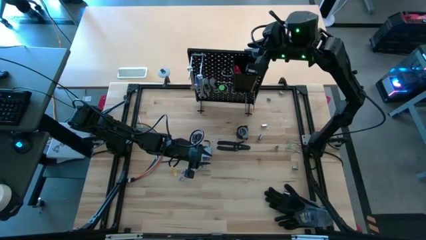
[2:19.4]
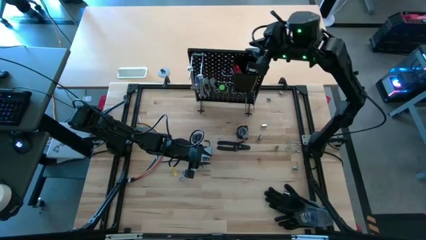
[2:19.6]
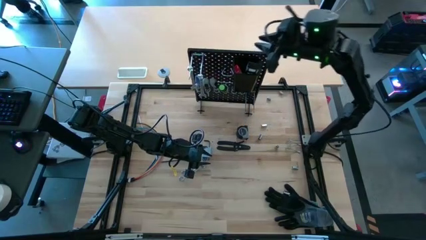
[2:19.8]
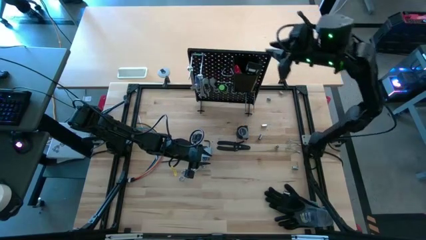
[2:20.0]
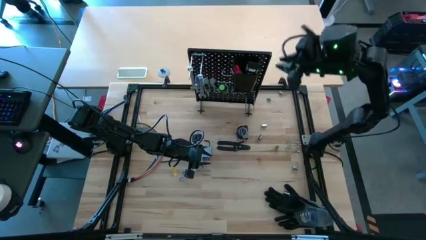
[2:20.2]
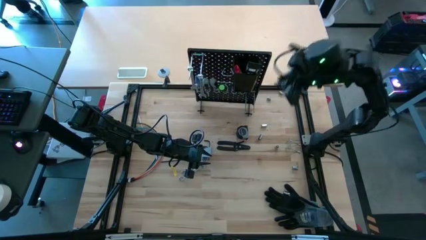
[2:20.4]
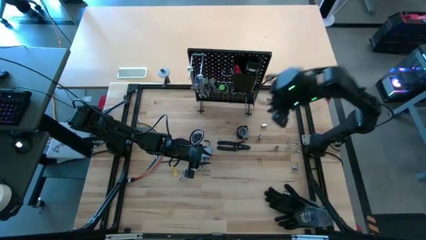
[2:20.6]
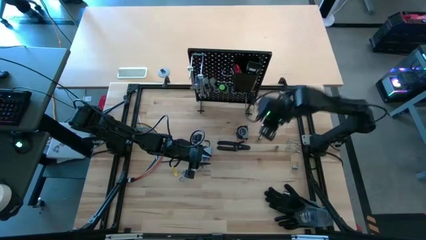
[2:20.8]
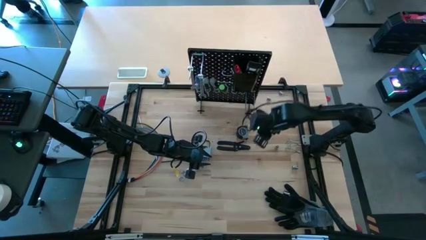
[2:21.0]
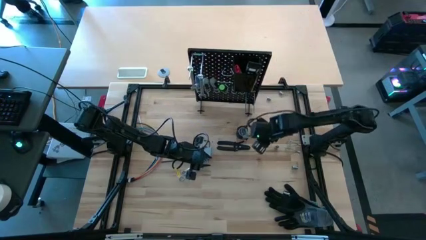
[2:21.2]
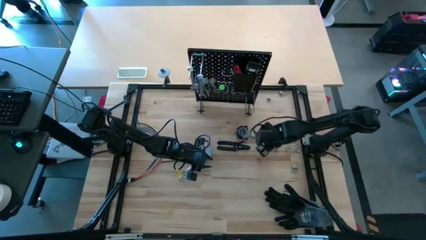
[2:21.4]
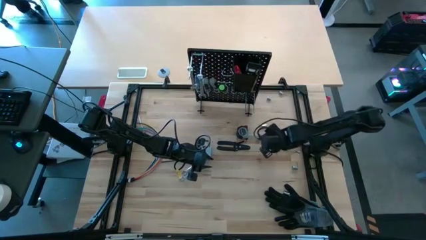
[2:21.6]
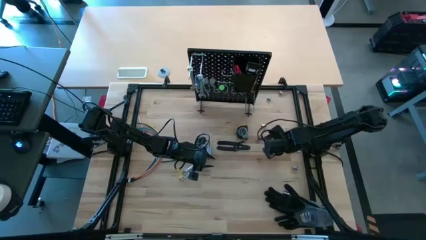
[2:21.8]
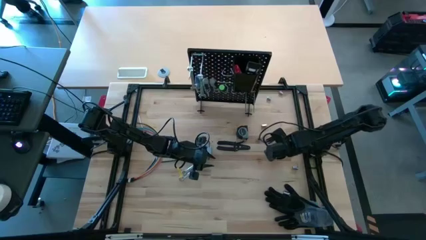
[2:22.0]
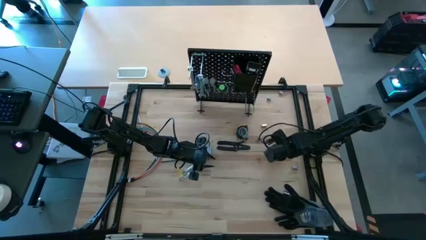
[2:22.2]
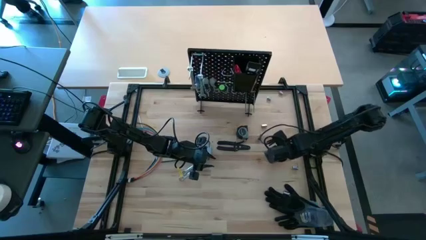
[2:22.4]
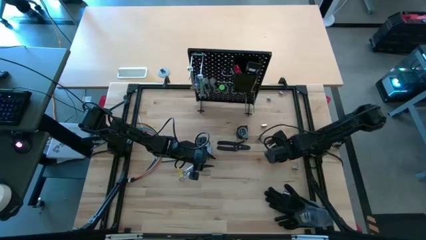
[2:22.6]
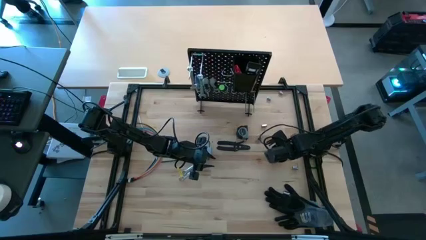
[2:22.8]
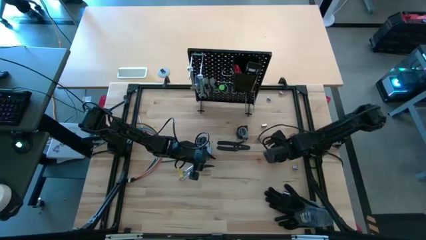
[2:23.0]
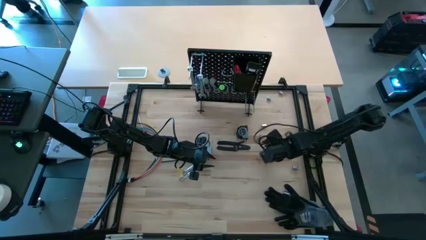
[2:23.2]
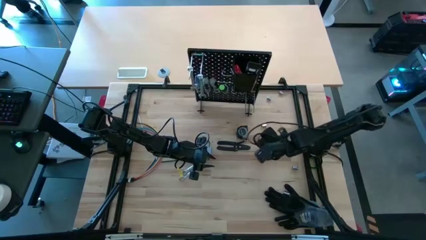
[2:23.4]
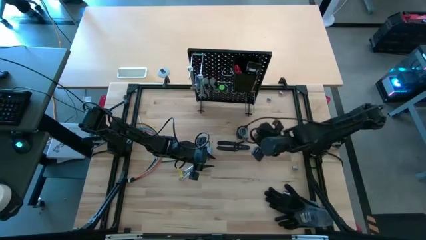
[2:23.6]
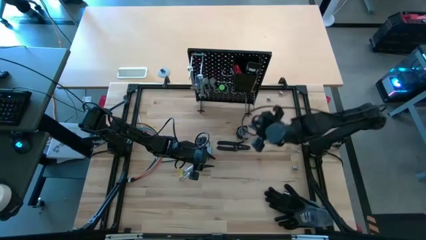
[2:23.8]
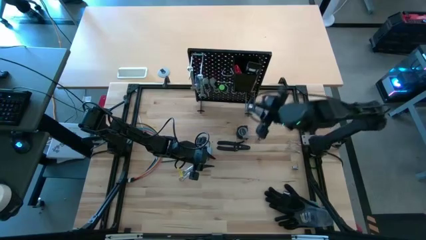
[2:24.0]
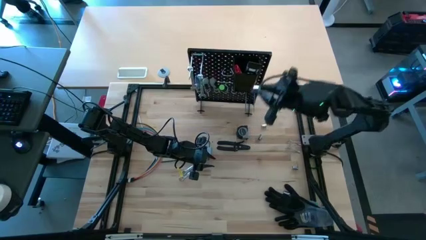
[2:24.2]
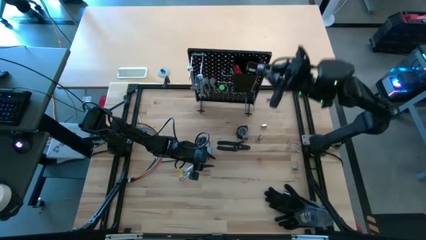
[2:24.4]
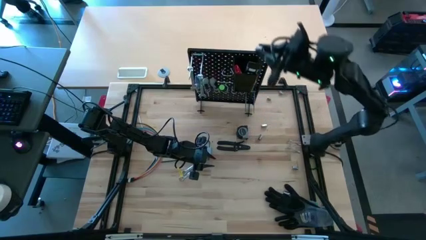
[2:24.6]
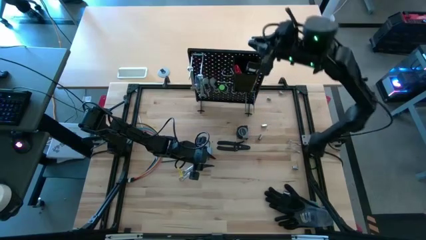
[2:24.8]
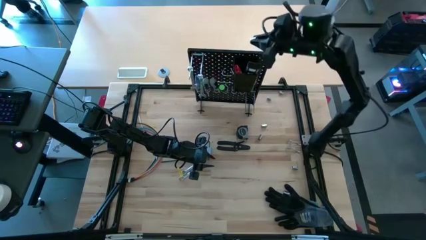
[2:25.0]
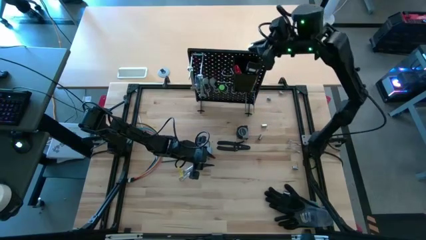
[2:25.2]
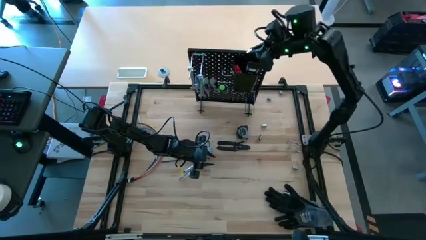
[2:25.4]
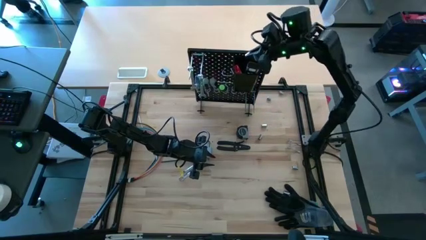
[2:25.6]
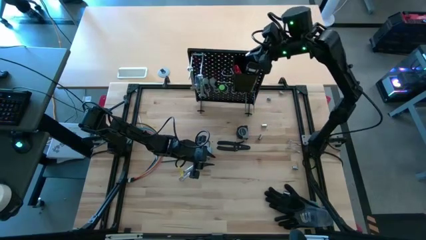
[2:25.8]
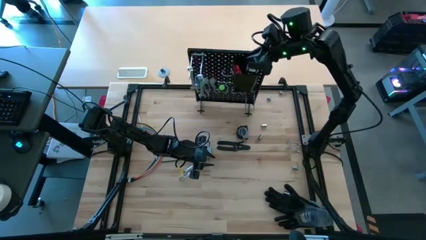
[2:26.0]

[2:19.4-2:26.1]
Task: Hang tools onto peg board
Put the socket into the black bin on the peg board

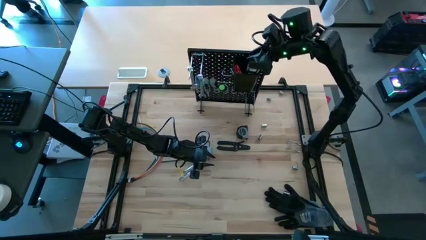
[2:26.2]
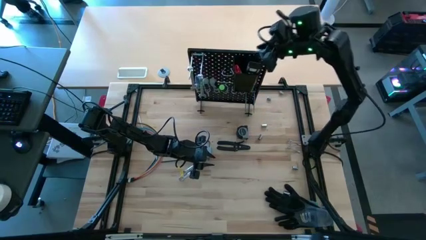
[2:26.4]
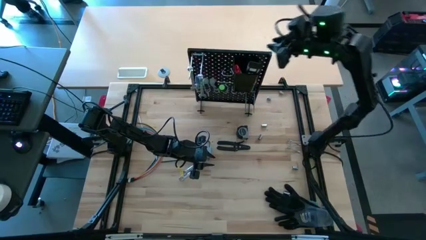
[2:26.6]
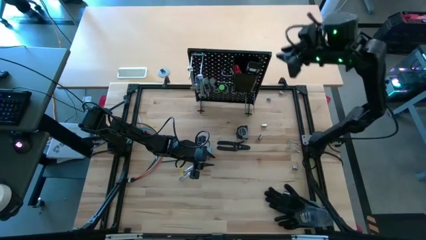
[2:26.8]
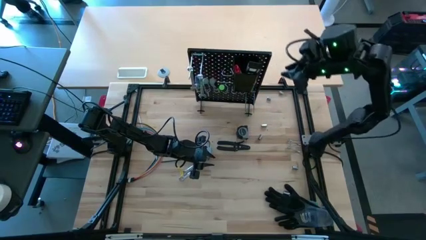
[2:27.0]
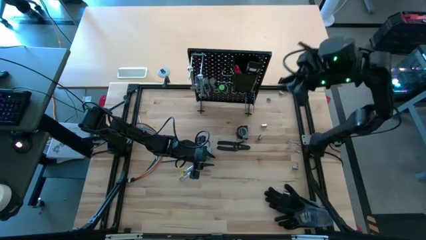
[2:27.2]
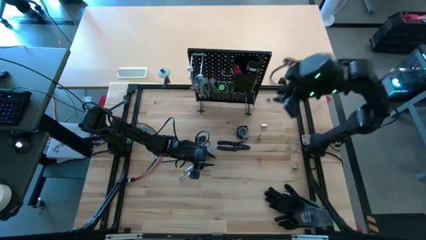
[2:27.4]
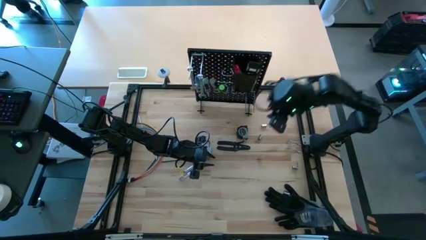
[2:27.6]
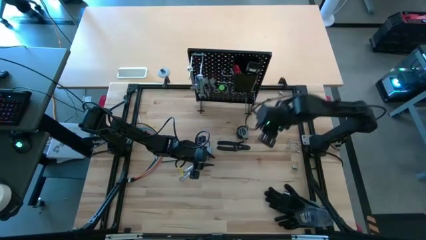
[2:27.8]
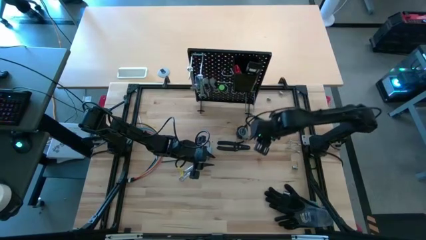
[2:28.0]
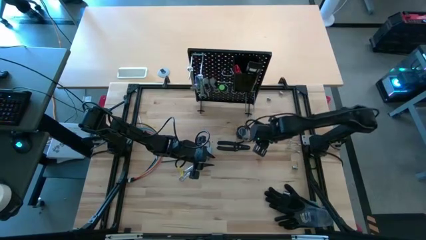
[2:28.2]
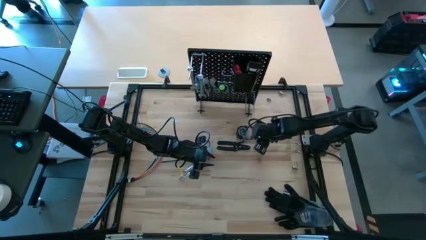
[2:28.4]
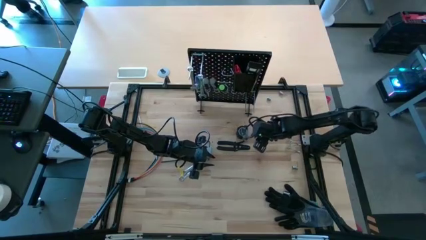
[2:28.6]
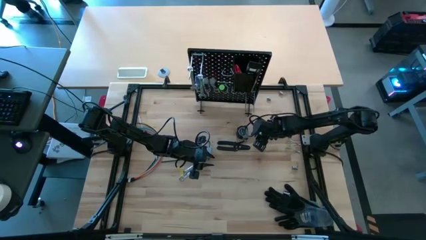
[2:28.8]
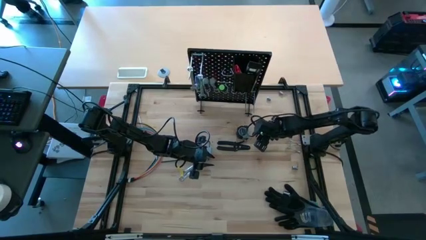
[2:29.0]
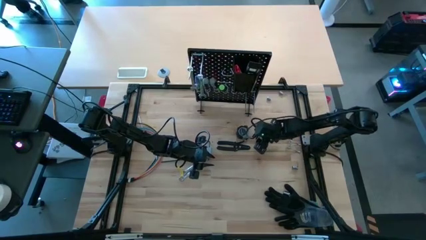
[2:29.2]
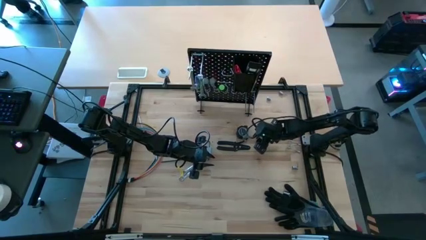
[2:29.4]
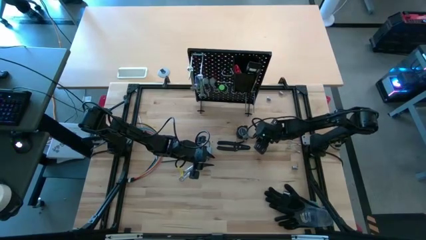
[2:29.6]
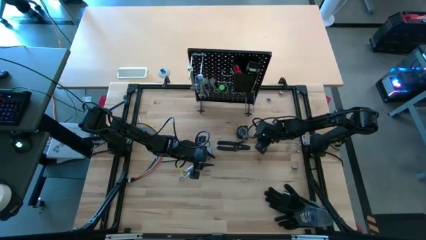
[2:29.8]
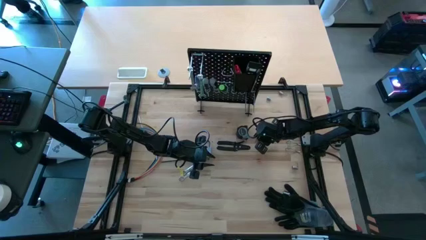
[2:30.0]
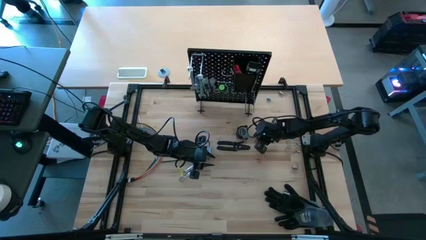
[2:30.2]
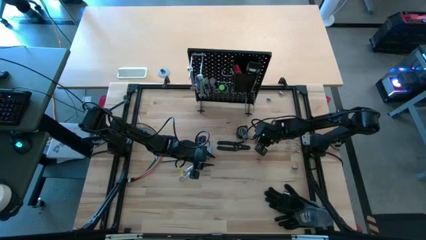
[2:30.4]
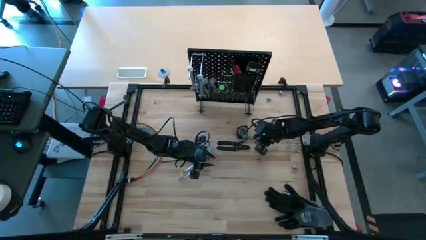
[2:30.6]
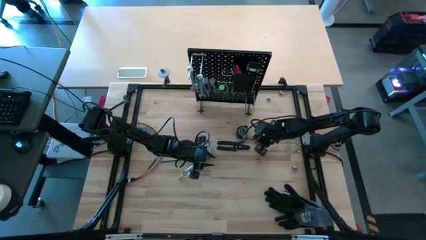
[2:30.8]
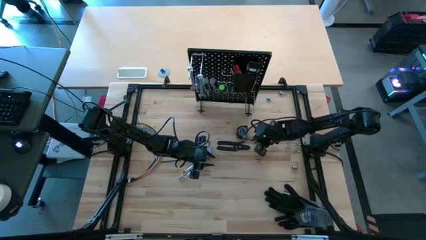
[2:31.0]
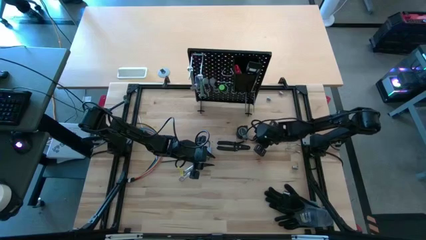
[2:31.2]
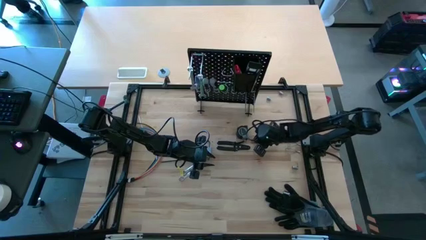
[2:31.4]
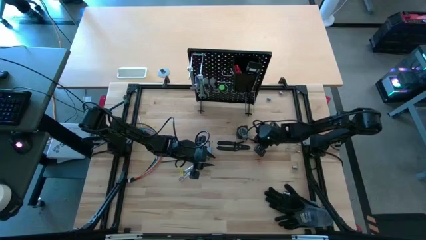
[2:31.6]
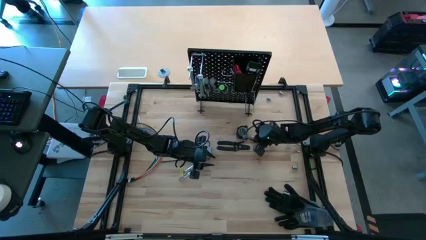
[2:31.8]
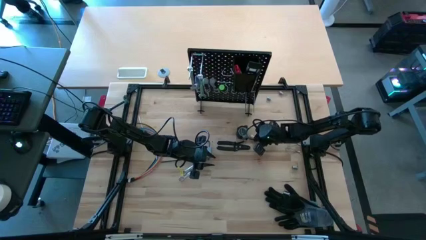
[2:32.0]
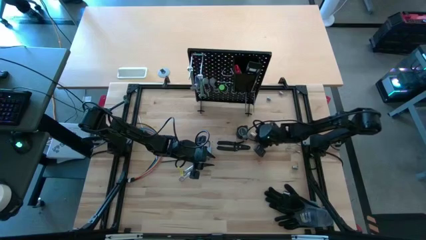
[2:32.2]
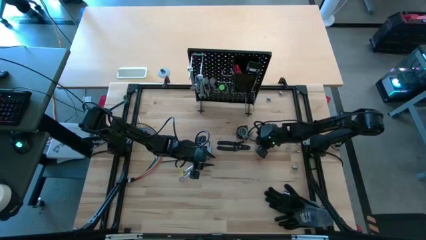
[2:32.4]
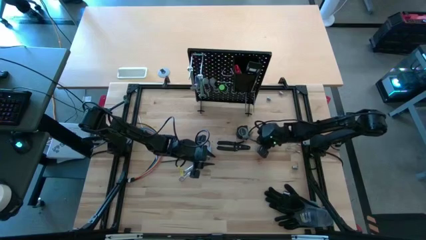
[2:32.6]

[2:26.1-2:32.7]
Hang the socket on the peg board

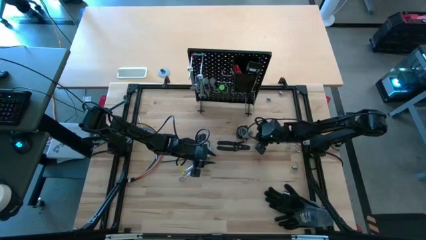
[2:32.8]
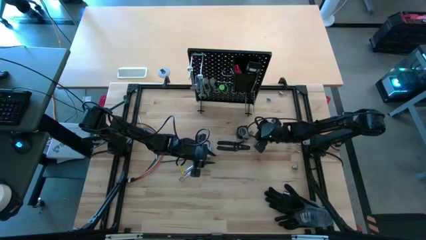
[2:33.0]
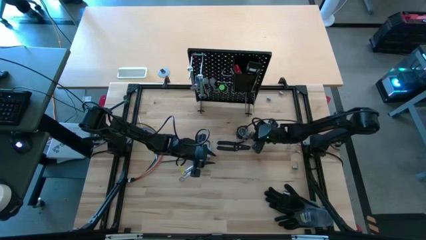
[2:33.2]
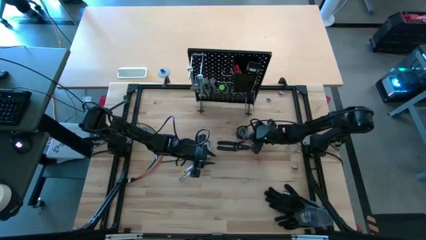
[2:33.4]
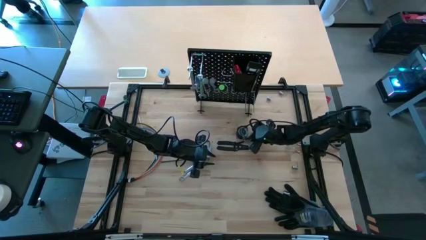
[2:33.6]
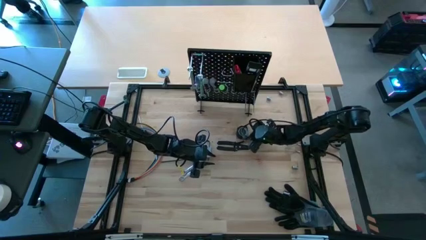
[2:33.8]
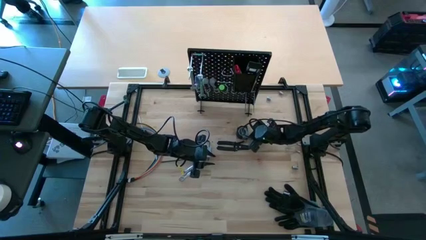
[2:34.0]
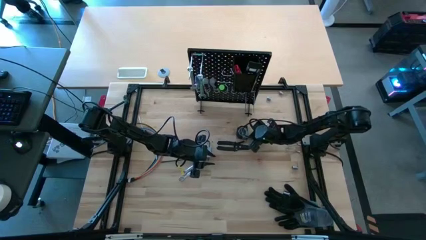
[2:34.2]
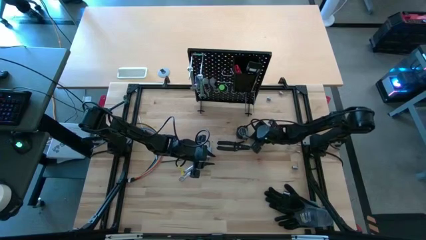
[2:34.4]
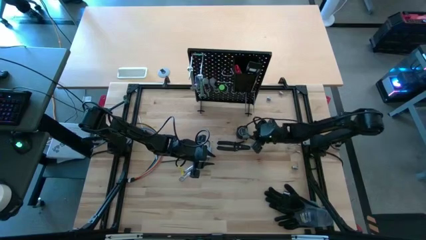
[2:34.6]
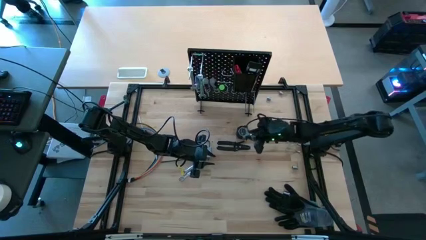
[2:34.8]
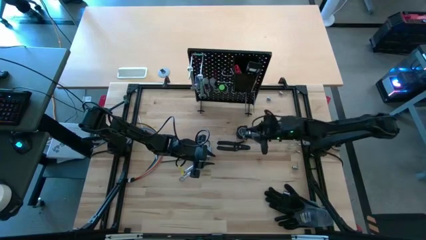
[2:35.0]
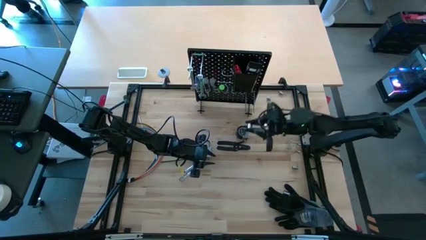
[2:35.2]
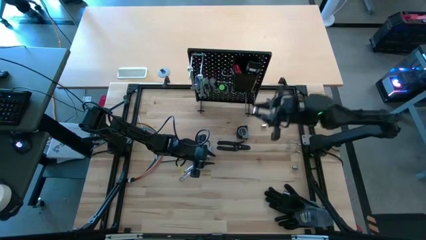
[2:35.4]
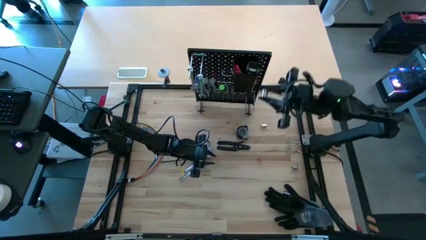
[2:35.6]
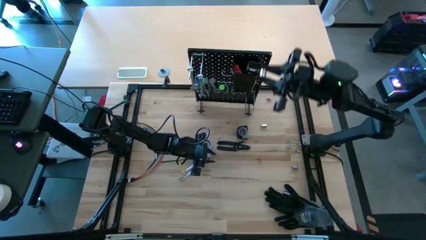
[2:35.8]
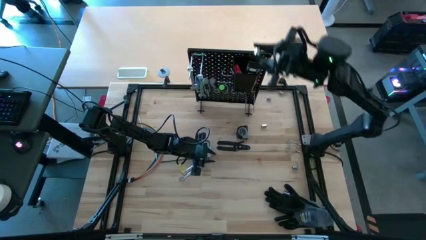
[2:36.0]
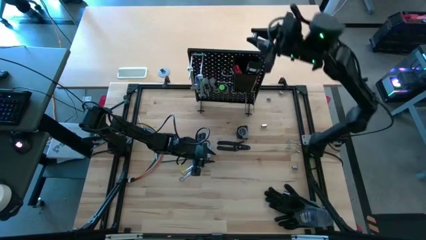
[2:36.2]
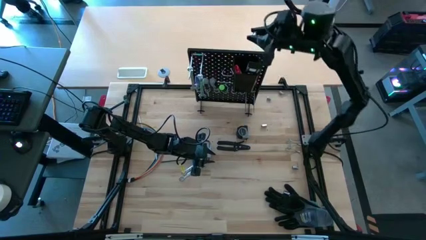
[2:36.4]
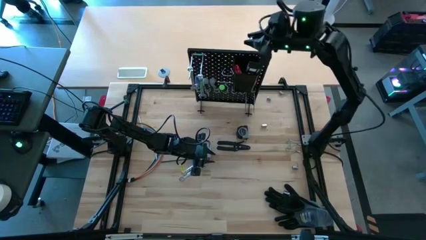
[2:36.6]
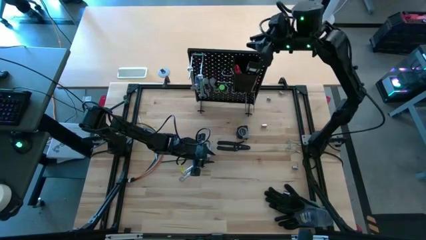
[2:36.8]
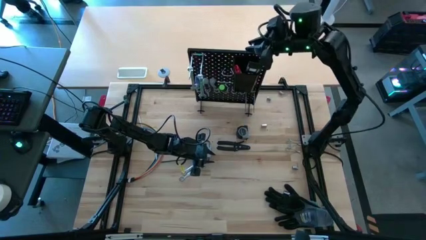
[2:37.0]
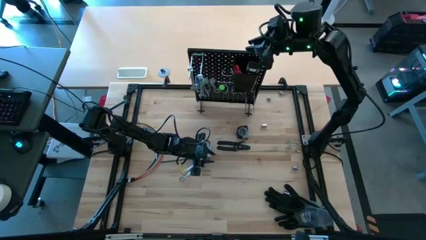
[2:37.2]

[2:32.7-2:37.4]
Put the socket into the black bin on the peg board
